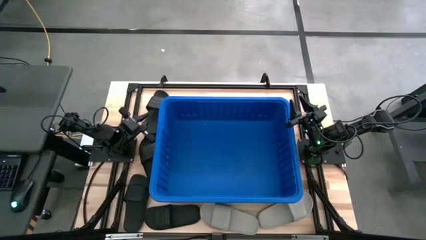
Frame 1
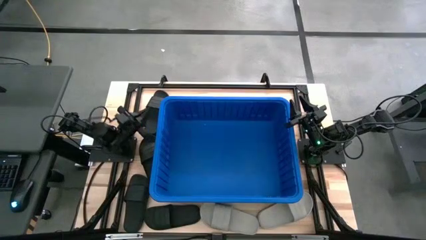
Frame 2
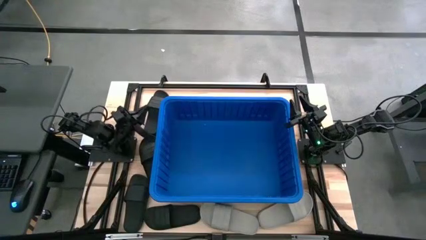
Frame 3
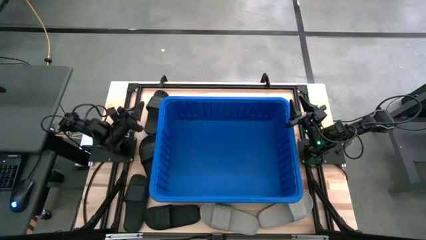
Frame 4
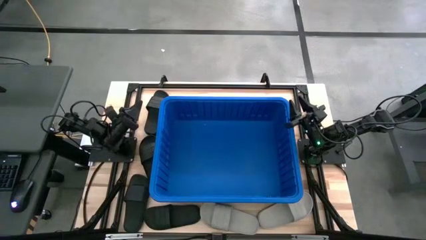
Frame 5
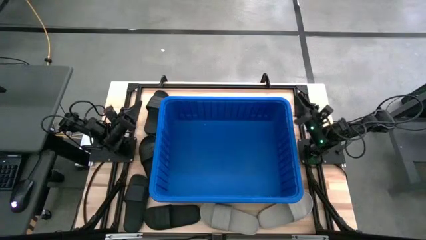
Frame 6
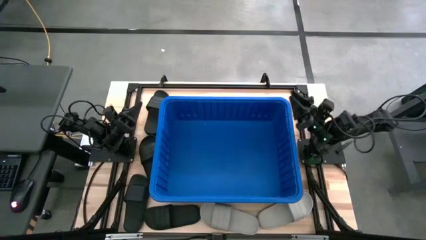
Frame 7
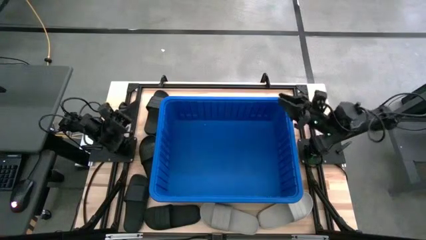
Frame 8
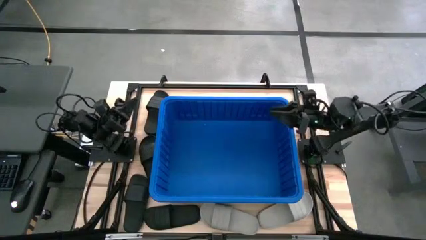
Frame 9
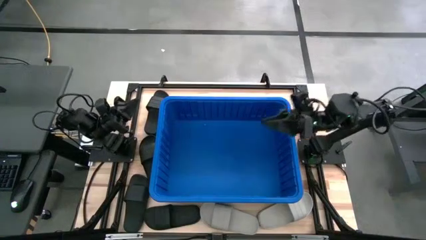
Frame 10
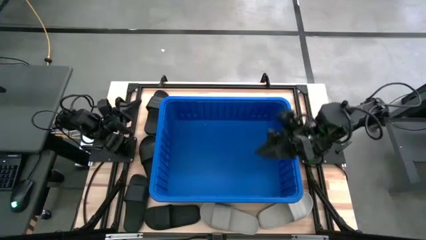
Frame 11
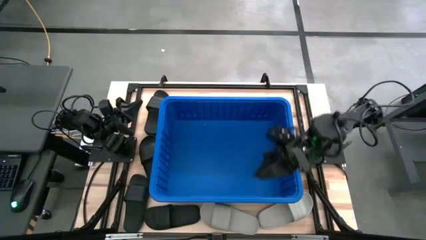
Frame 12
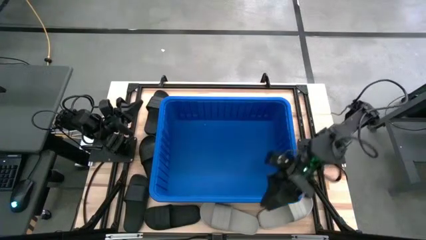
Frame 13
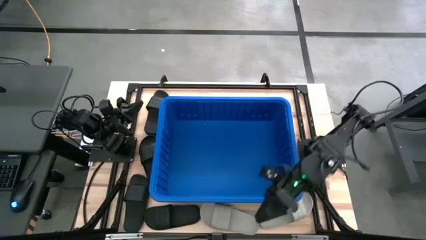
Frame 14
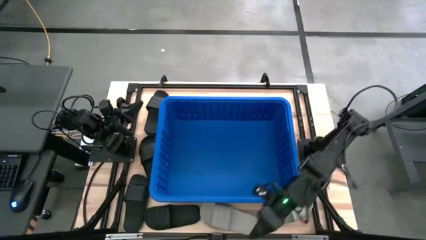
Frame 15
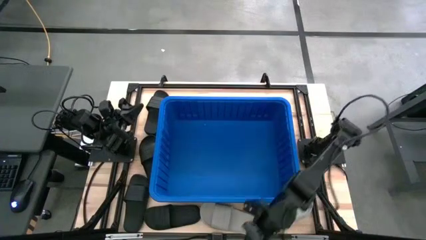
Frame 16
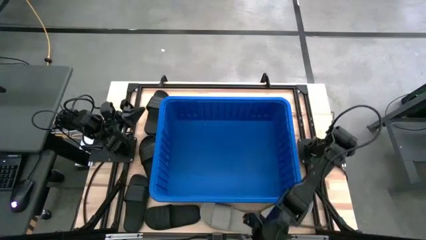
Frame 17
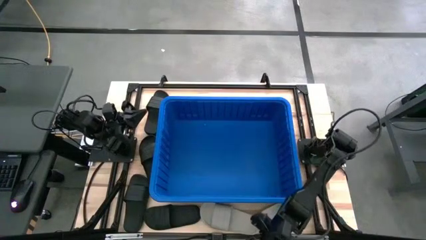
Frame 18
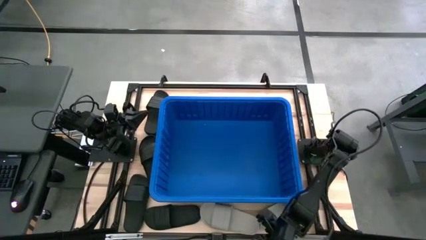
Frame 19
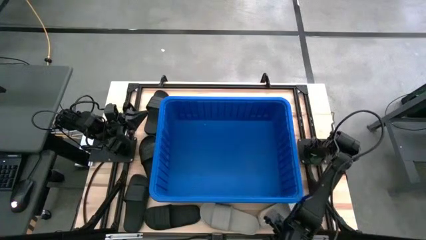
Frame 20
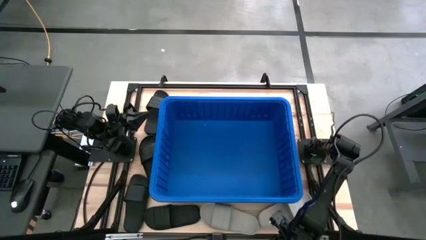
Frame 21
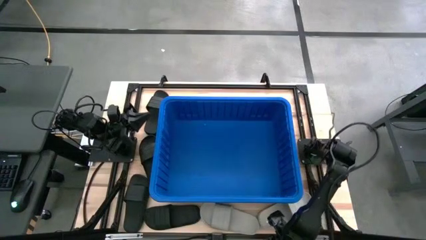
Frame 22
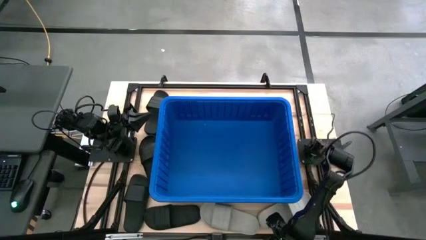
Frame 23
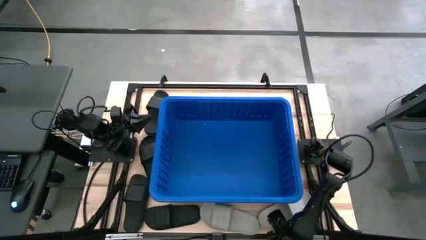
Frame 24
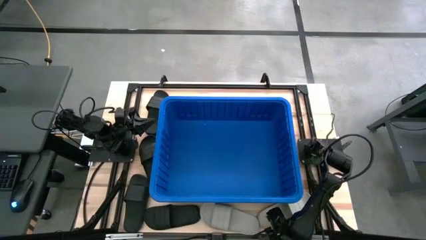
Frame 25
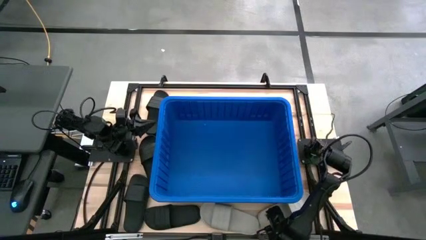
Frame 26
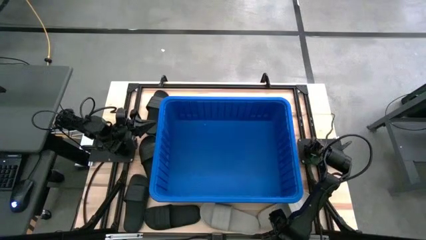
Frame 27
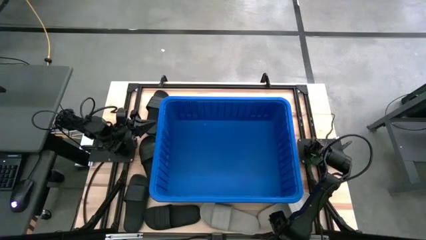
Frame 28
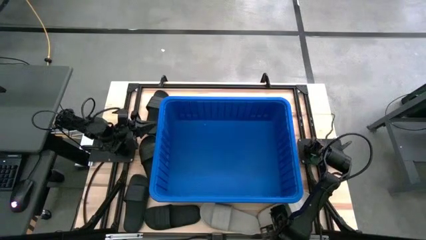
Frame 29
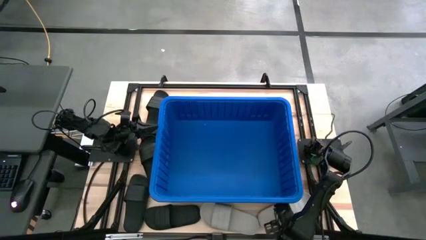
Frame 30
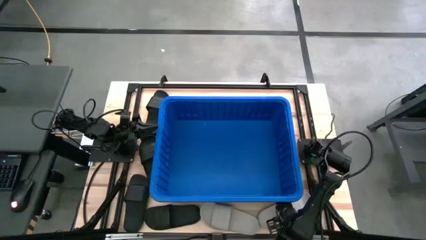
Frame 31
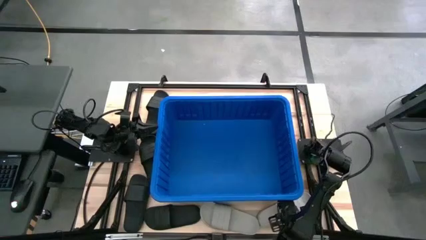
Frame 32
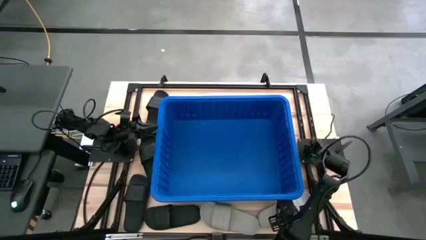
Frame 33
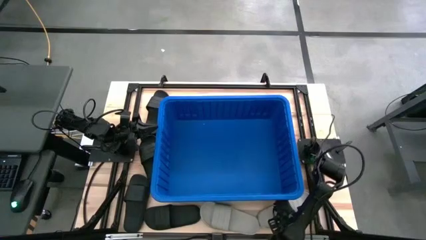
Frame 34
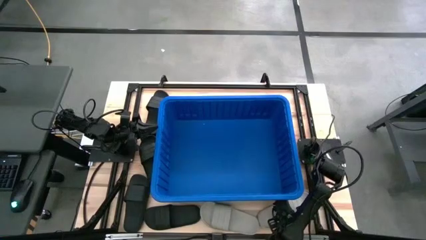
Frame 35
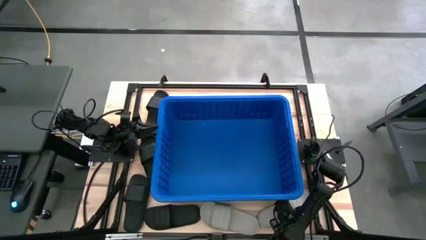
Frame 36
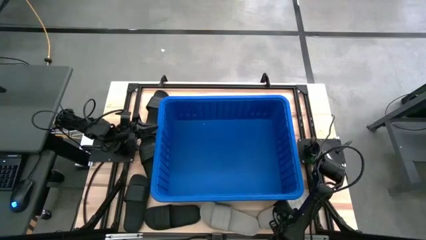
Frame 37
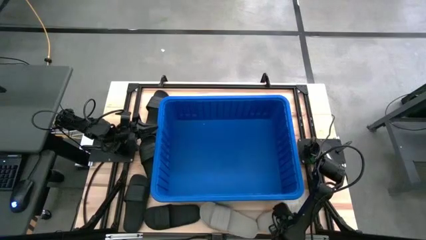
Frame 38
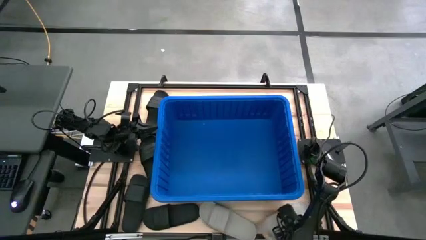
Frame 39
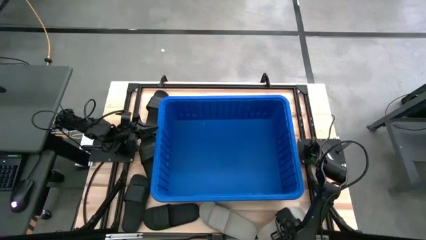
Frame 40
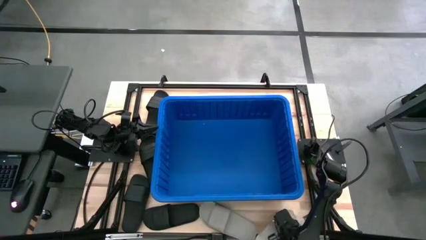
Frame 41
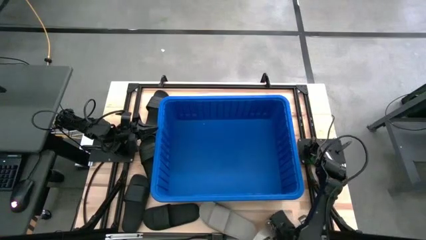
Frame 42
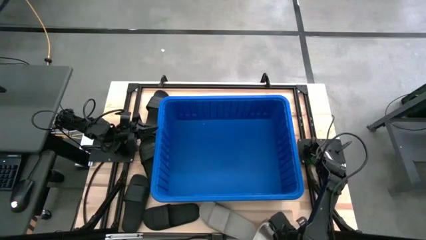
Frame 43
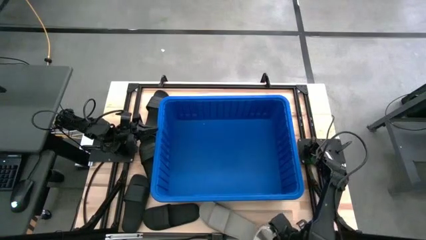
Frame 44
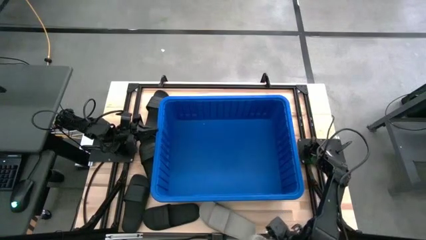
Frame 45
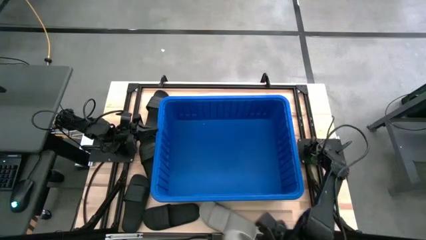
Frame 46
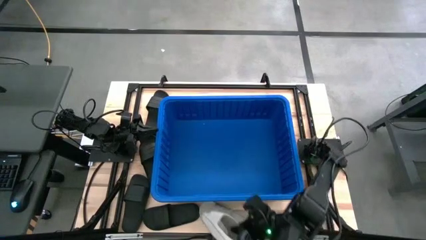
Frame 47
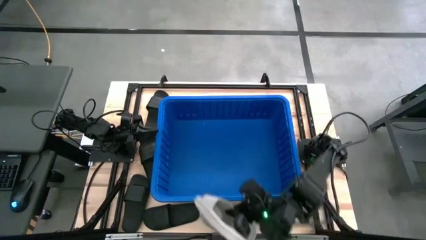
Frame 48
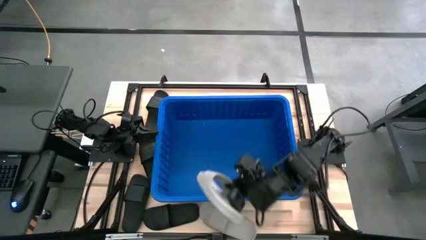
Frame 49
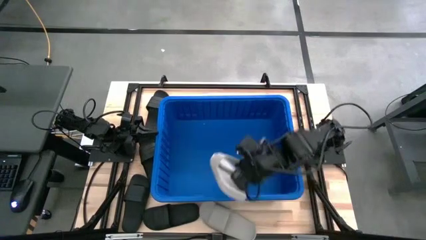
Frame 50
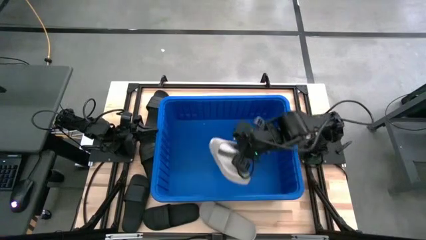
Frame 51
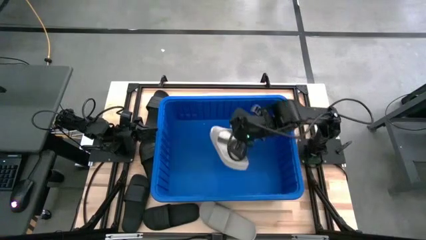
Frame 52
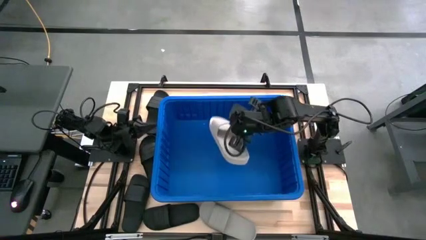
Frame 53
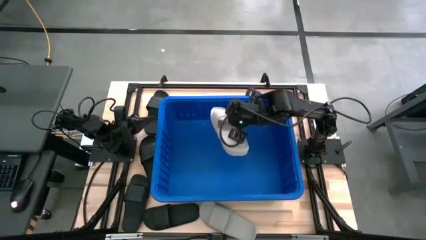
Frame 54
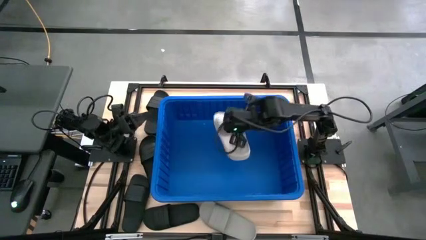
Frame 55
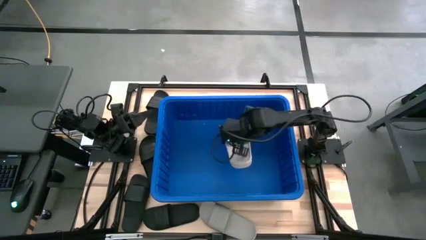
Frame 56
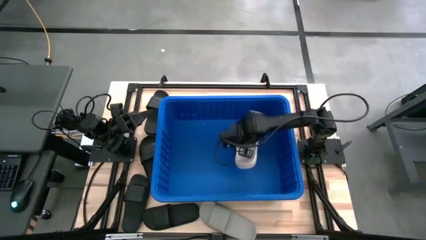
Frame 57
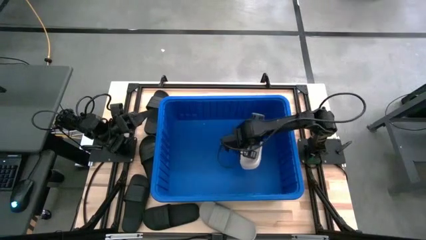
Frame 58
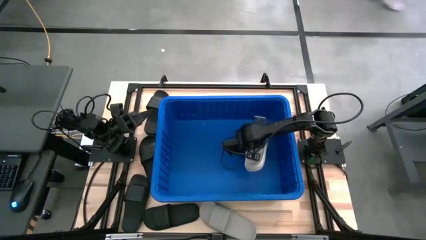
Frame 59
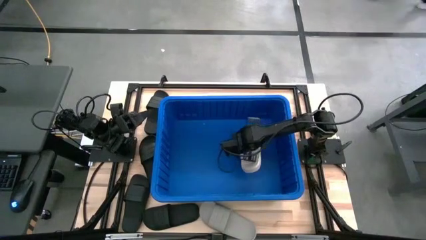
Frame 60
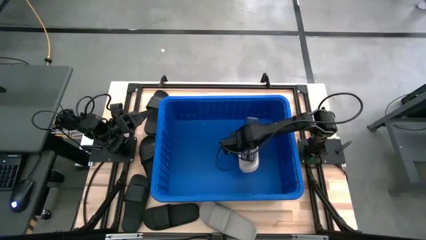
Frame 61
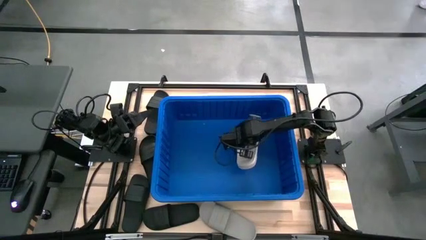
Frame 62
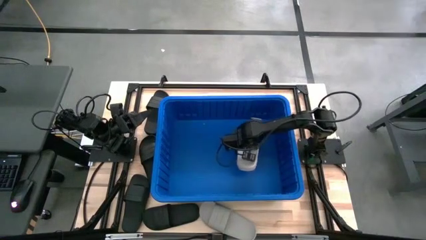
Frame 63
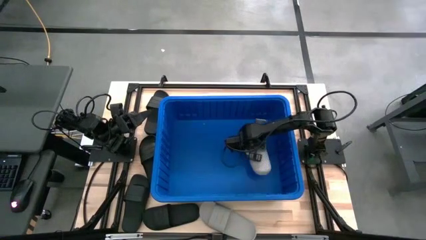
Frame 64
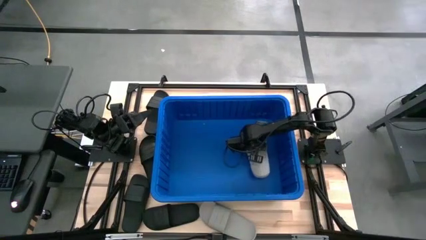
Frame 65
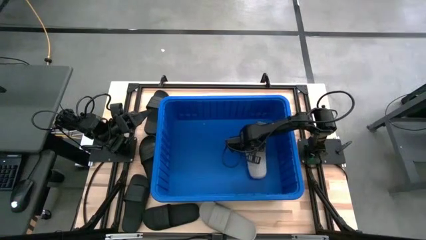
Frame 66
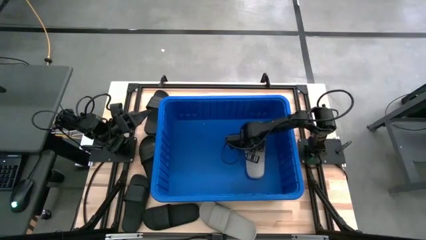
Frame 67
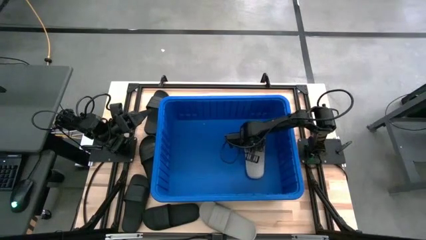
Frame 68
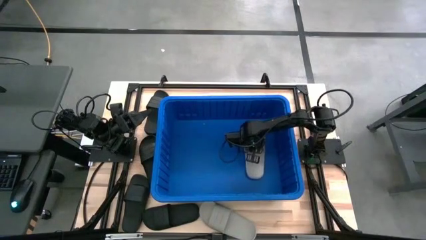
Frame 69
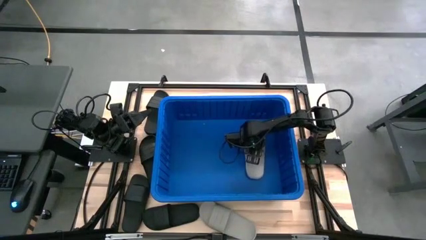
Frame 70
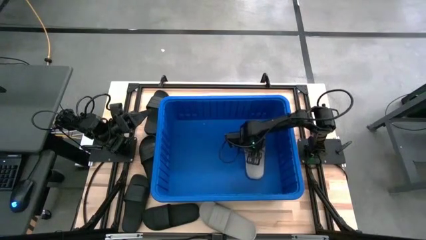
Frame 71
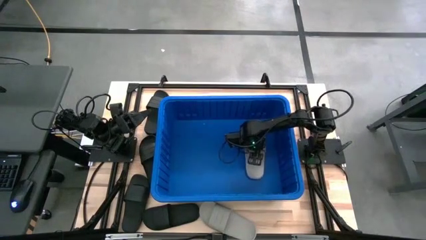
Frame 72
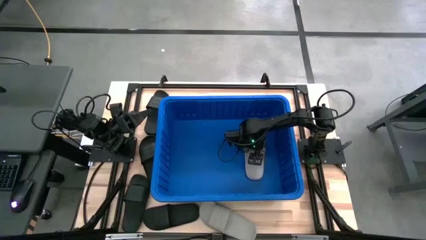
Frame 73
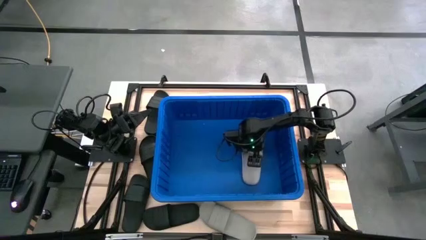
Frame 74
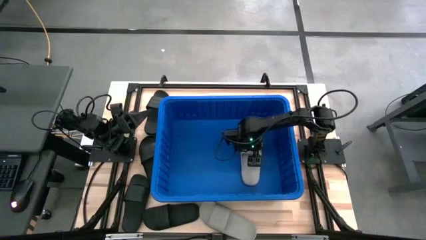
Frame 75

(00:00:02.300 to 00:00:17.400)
Task: Pick and place slides into bin
Put the gray slide into the blue organizer bin
